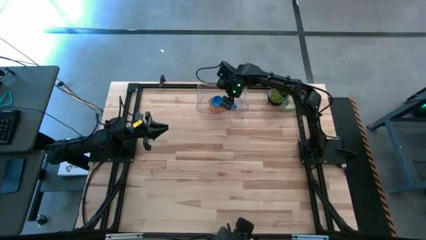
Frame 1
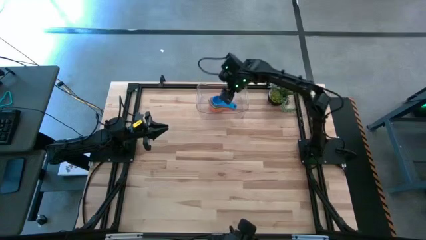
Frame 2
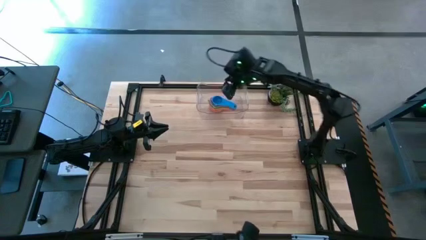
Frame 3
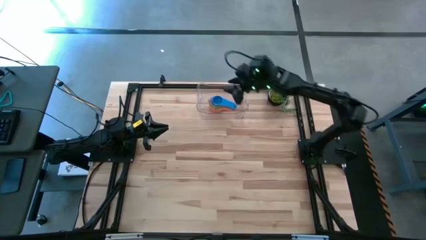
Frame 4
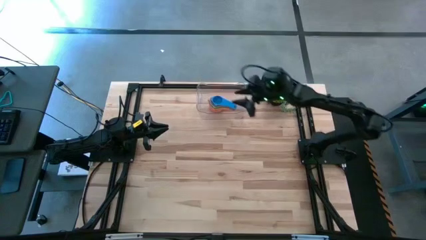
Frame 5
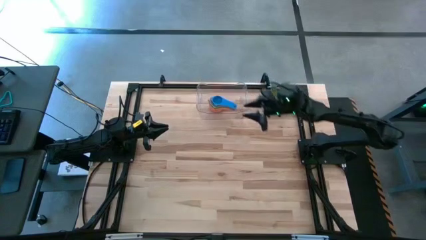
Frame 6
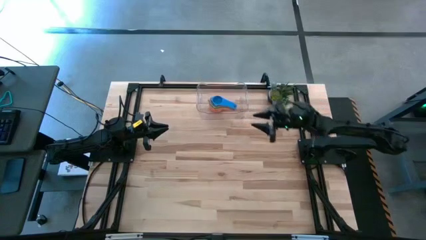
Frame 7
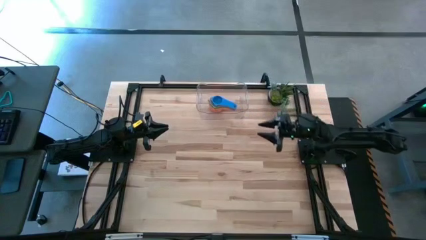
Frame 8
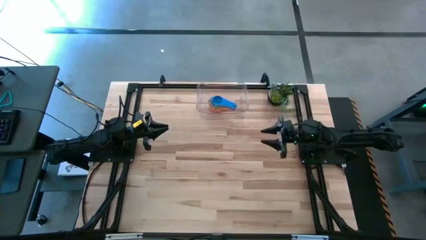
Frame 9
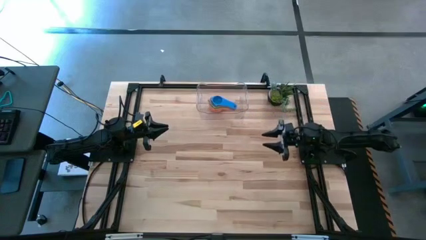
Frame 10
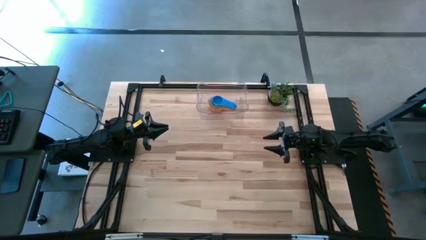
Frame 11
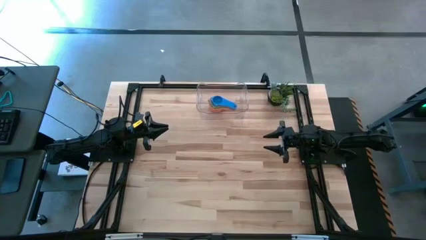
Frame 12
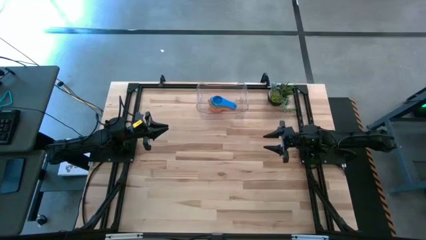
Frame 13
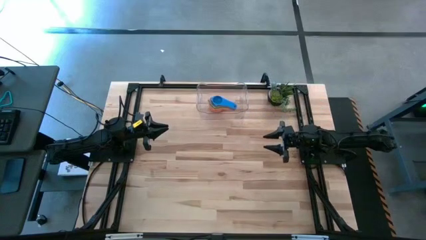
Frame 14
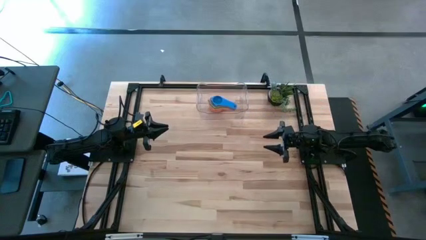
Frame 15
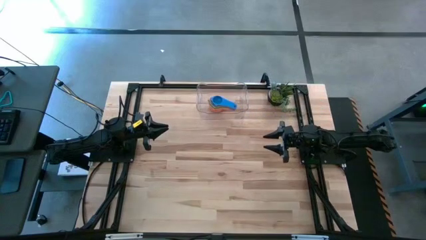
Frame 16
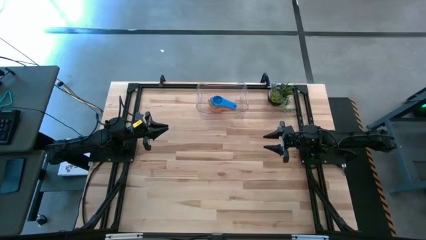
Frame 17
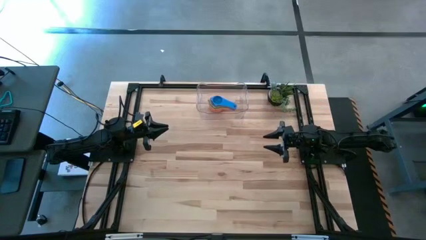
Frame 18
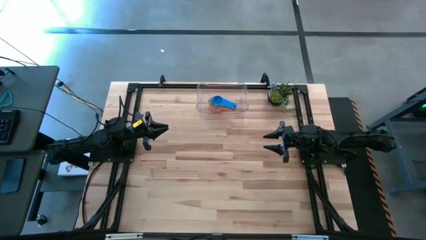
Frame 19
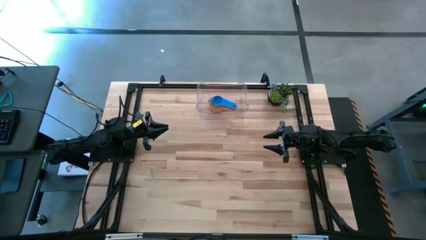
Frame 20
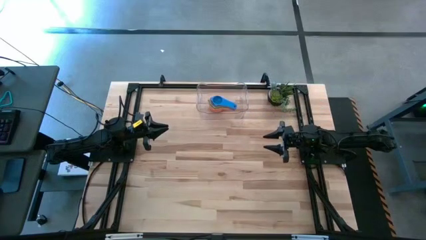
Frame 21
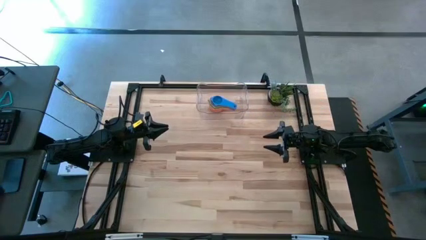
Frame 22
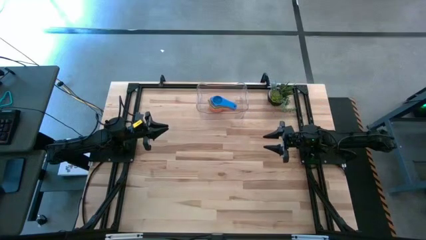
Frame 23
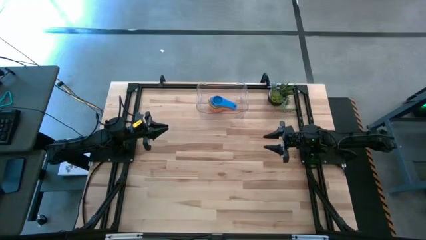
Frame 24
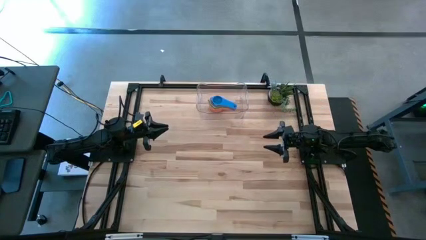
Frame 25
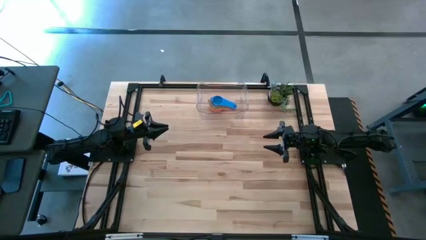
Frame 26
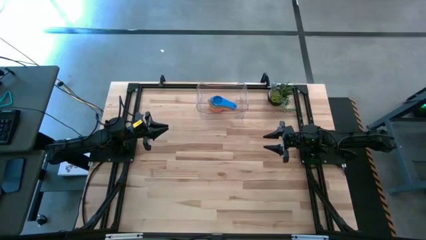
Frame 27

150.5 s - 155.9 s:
Task: Nest measuring cups in basket
Return to Home Position

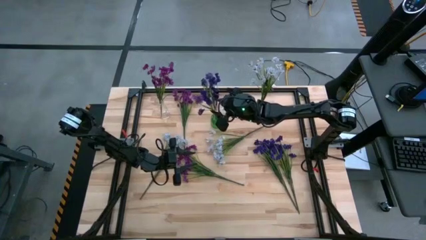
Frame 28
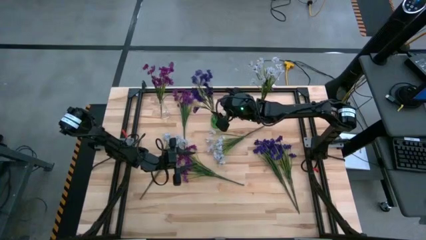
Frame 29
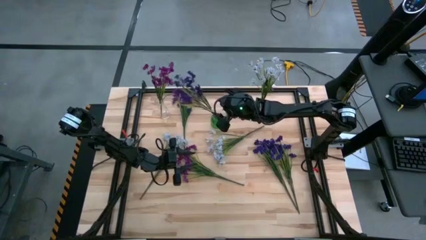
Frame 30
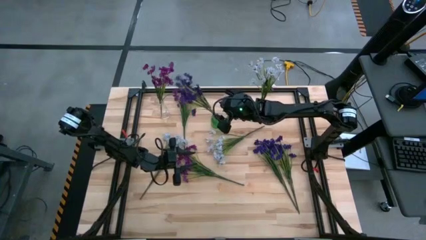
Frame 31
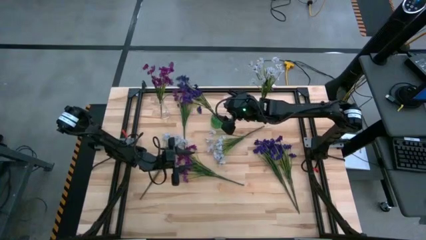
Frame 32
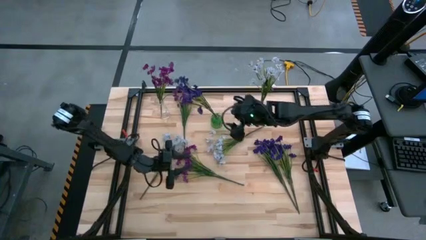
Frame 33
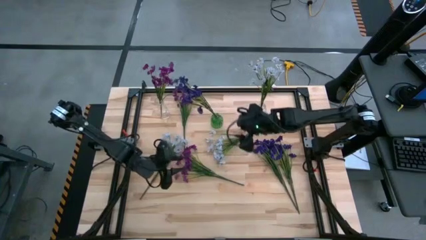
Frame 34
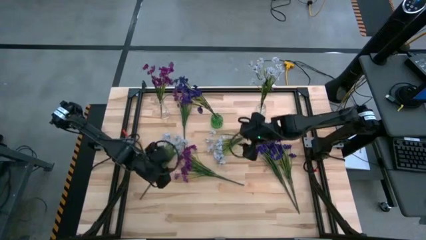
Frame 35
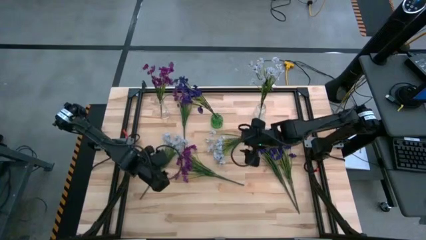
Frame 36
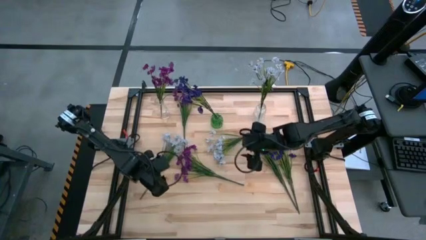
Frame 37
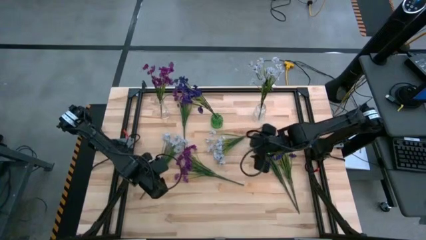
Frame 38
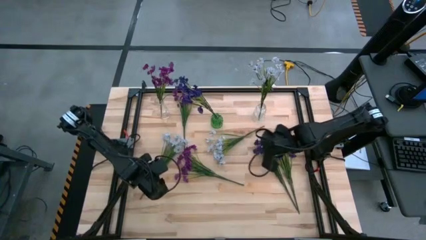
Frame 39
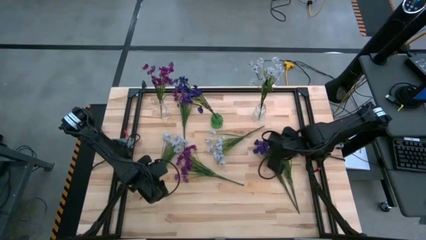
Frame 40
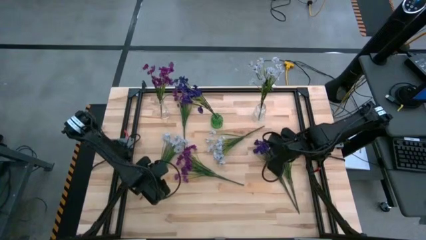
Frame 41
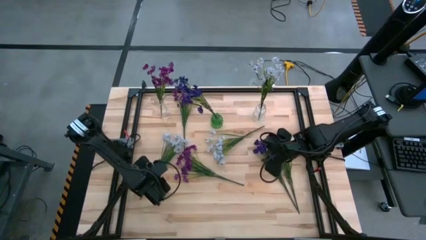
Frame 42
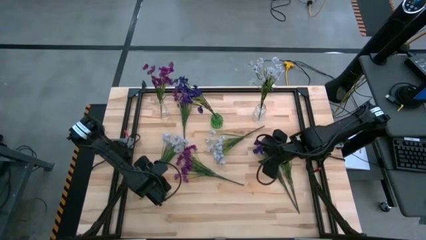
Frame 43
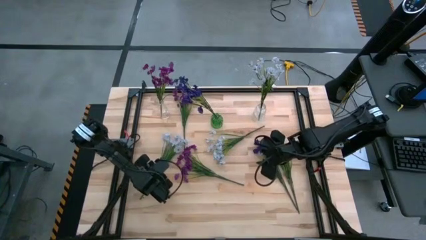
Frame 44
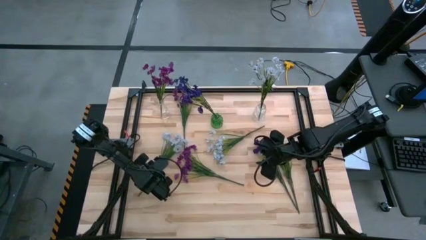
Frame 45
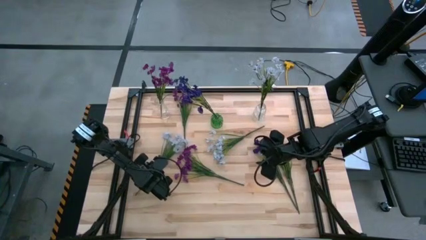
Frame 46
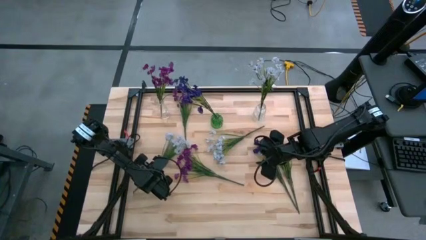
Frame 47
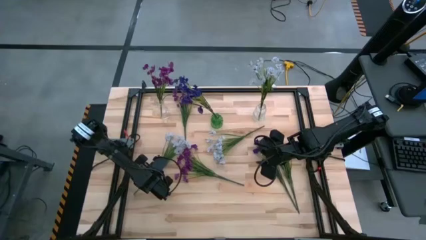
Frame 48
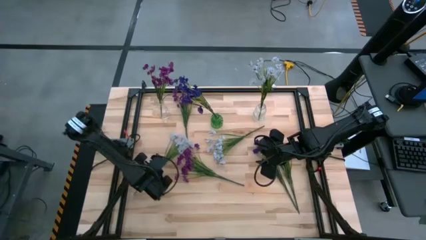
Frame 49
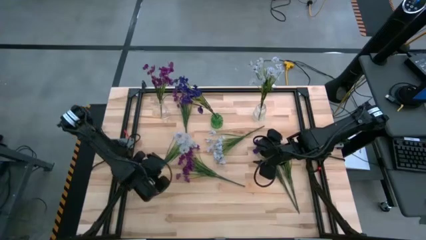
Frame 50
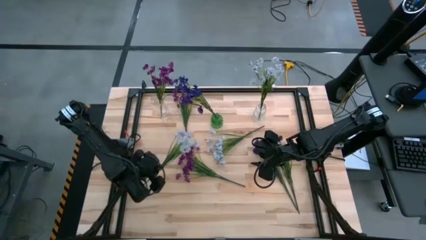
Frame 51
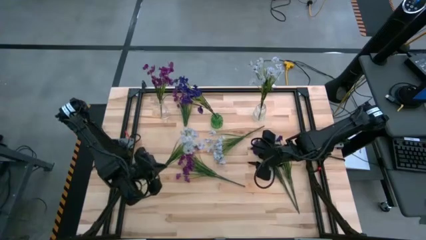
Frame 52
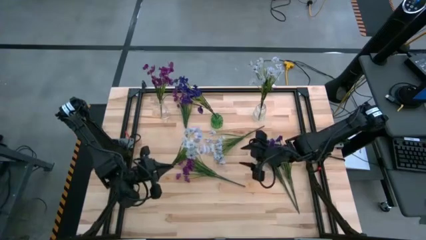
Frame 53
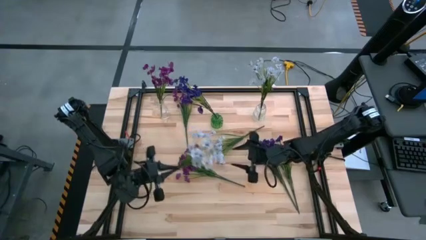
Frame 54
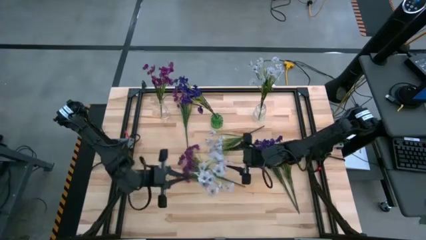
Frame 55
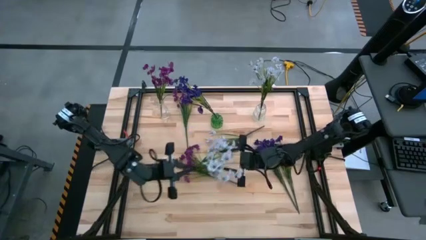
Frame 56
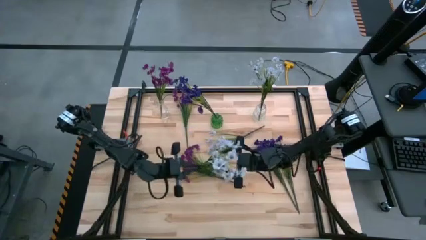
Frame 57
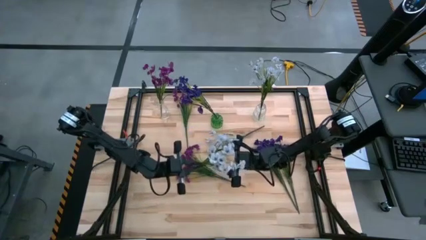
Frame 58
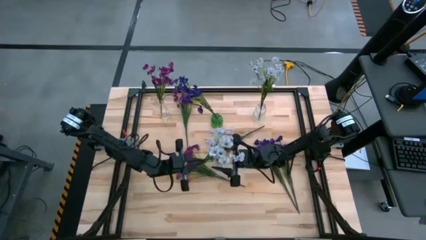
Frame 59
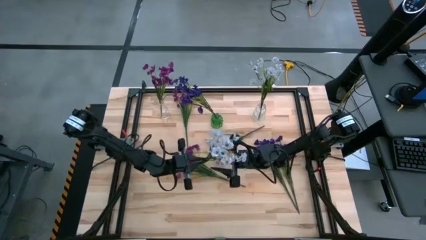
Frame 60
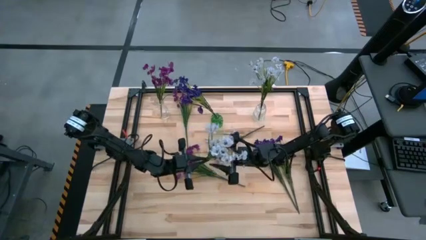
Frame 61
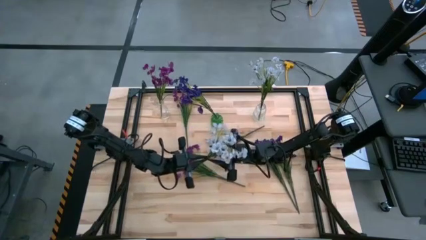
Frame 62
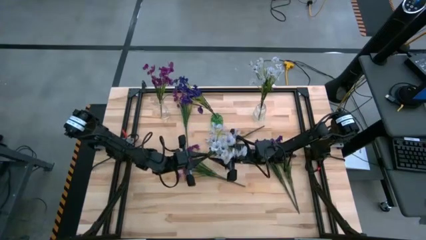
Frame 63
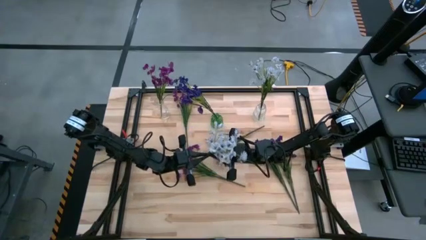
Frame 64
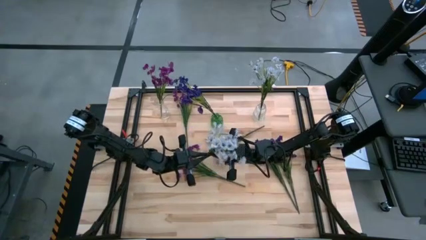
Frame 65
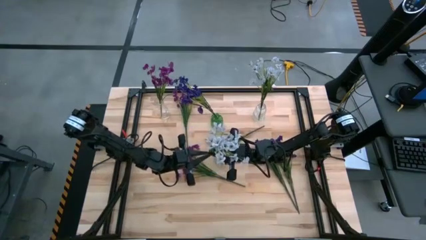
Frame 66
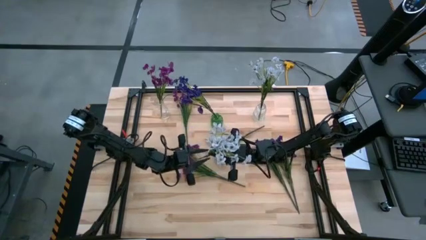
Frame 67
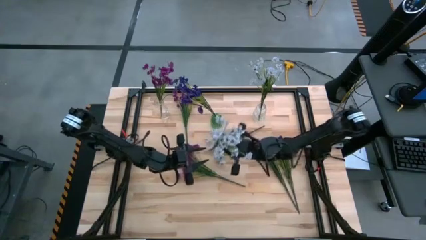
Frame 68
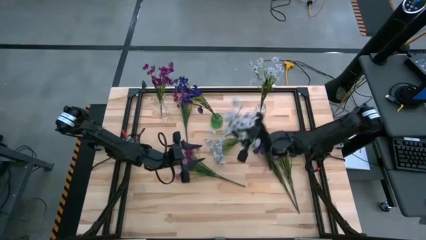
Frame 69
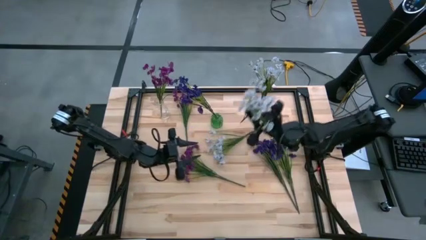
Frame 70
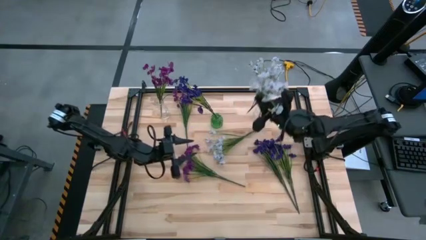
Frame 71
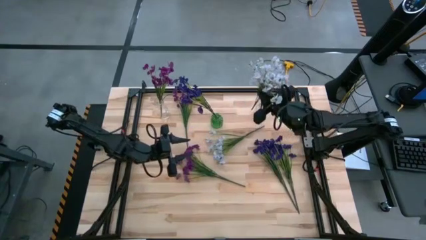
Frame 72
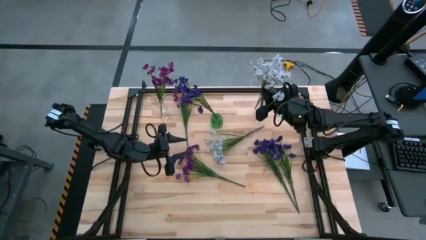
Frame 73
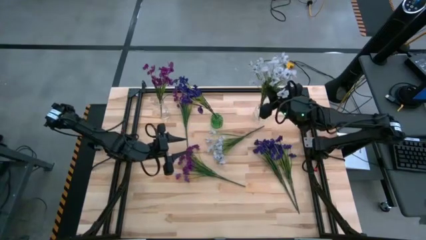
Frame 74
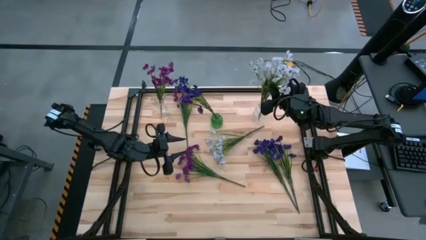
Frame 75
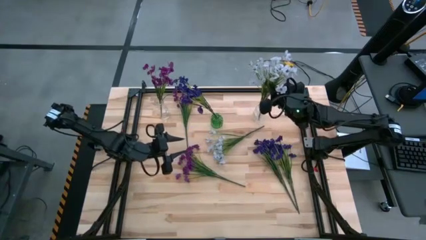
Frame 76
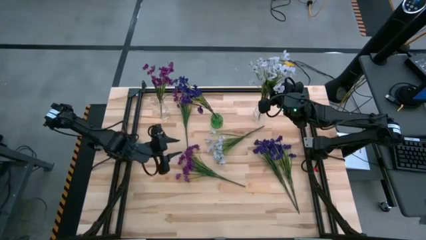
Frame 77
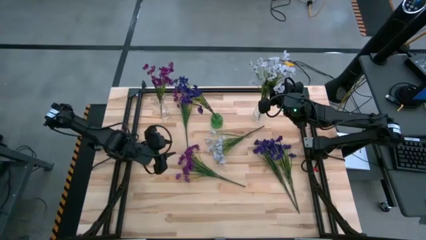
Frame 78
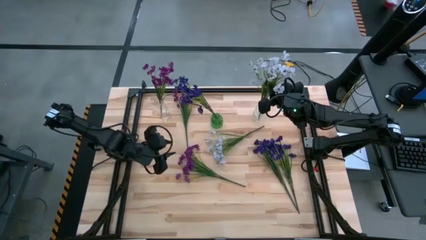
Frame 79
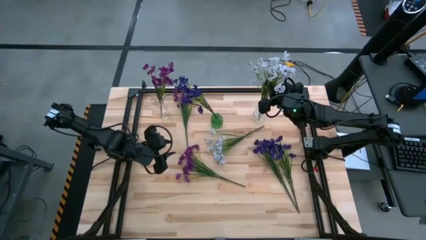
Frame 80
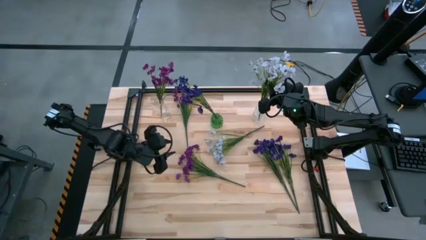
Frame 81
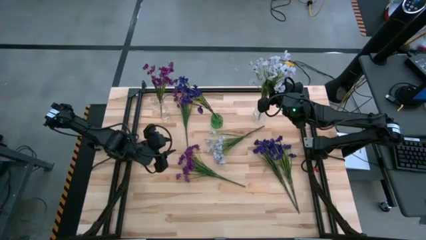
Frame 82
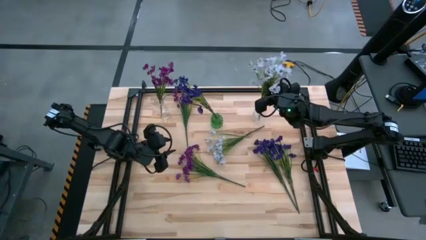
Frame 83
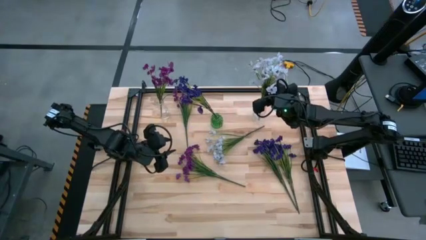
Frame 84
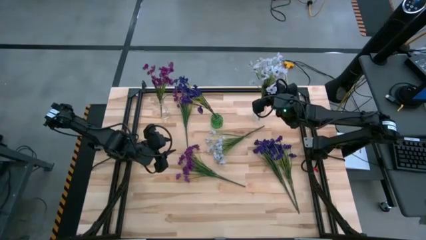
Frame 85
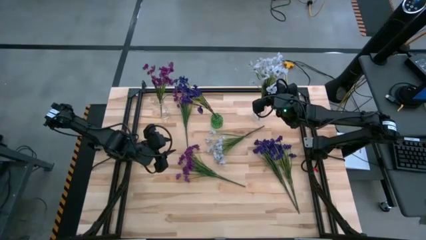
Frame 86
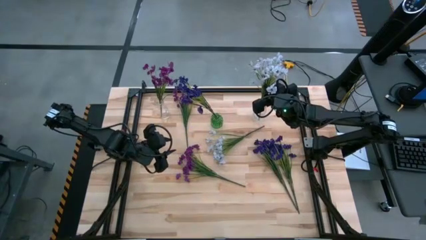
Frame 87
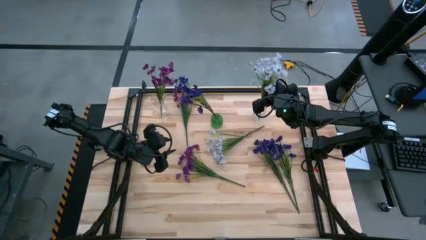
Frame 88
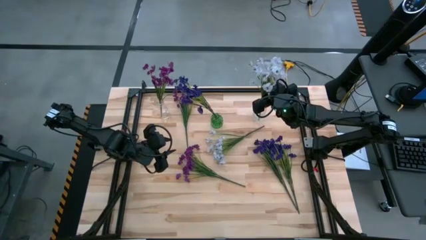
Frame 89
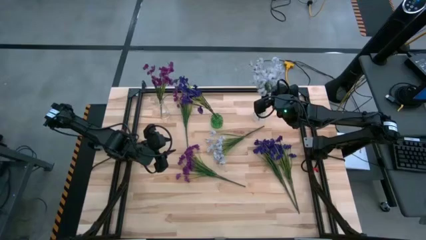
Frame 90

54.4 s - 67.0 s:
Task: Sort flowers into vase by color
Put the left white flowers into the right transparent flower vase
